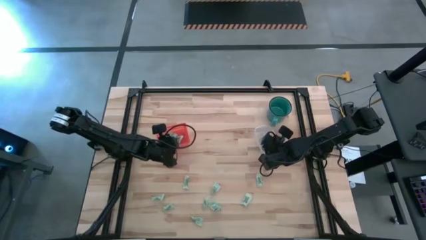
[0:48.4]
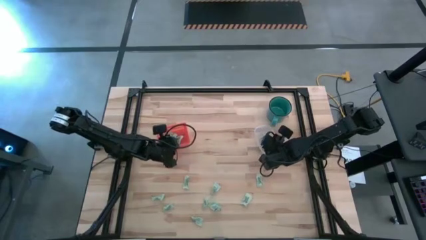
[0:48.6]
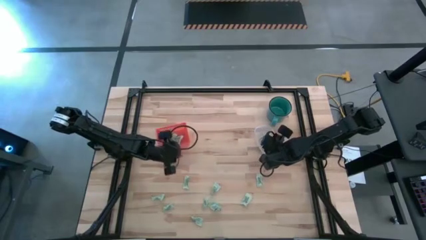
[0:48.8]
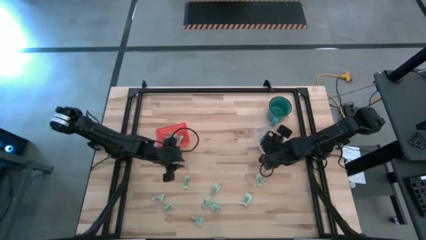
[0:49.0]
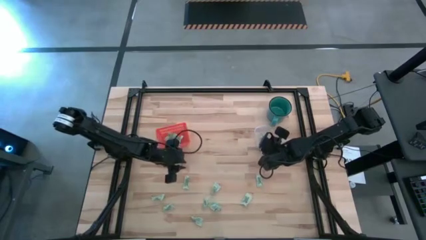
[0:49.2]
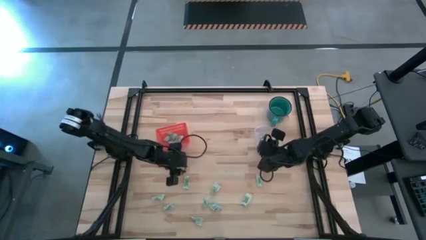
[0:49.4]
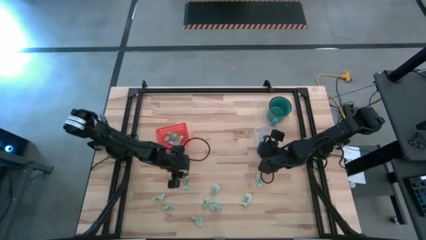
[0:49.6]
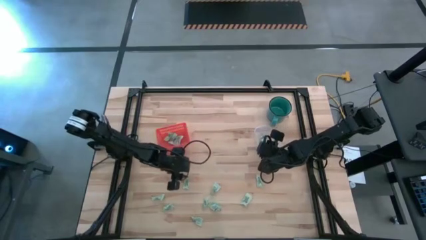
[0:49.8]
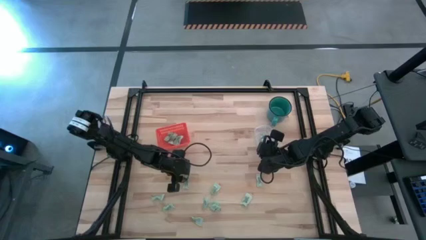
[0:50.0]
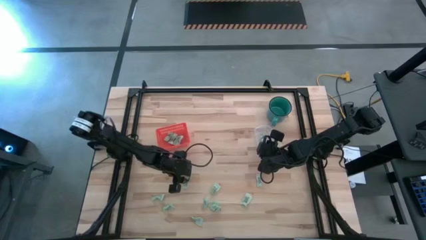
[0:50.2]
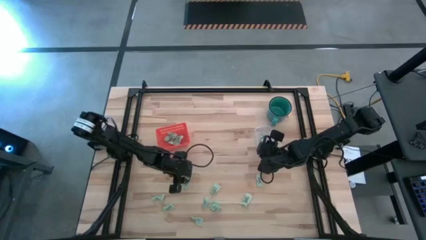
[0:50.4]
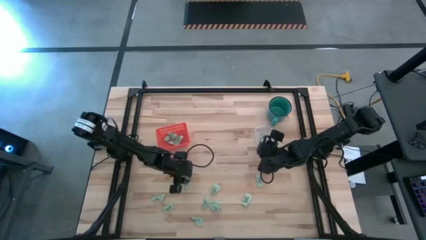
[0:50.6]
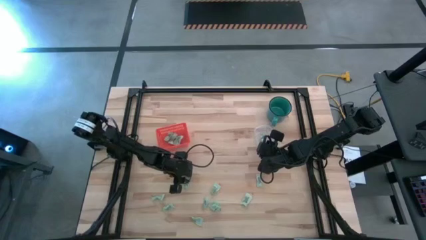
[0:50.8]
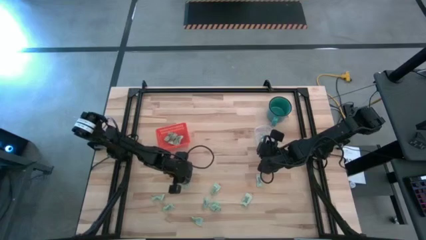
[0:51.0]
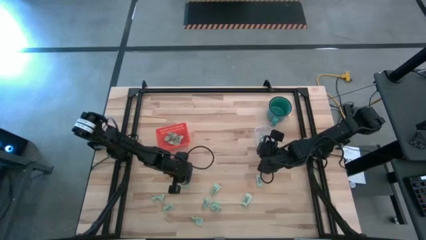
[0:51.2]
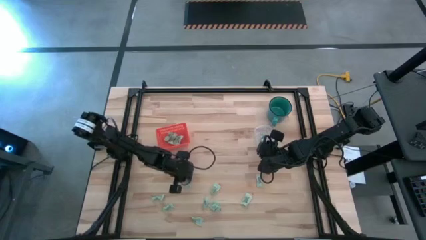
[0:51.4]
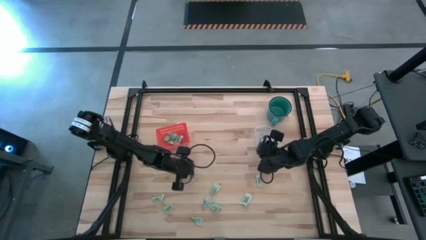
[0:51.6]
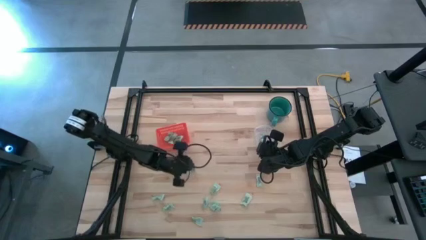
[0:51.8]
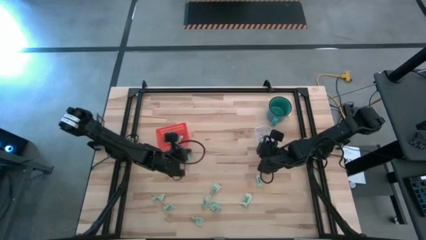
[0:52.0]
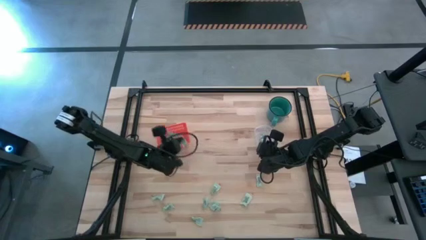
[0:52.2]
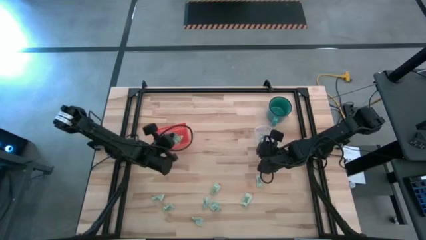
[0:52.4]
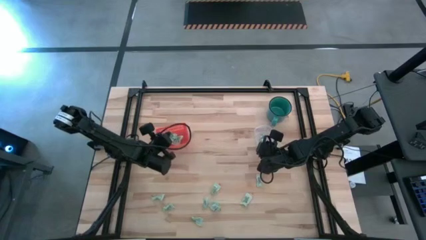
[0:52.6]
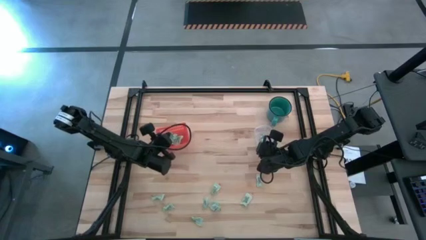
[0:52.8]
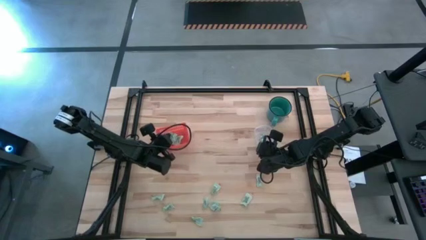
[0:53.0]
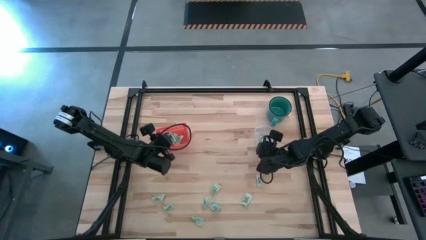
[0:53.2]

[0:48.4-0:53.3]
Task: Pick and place items into bin
Put the stevia packet into the orange bin

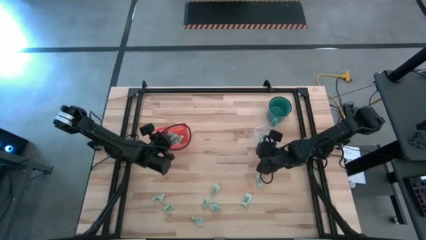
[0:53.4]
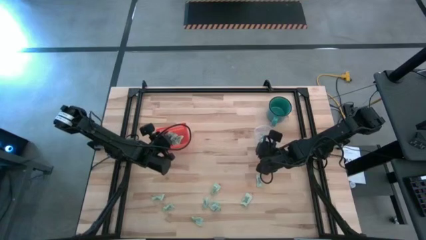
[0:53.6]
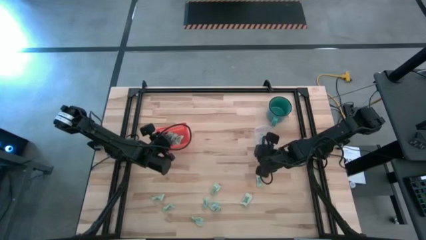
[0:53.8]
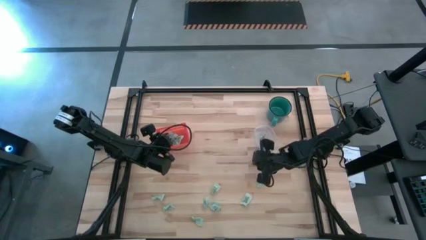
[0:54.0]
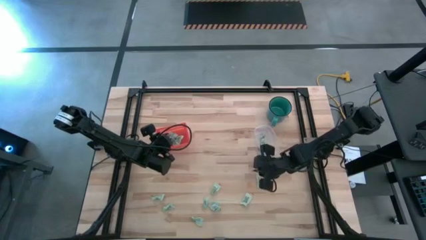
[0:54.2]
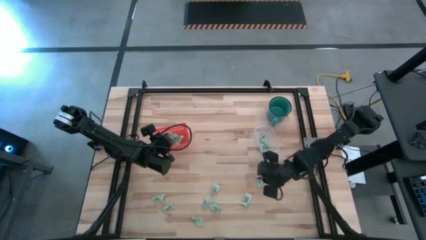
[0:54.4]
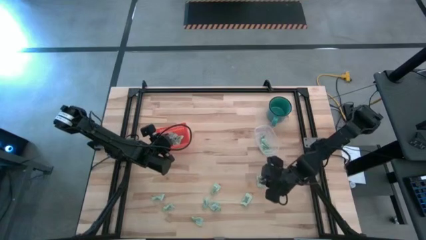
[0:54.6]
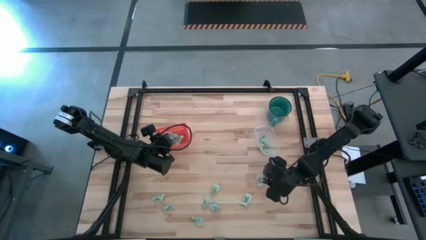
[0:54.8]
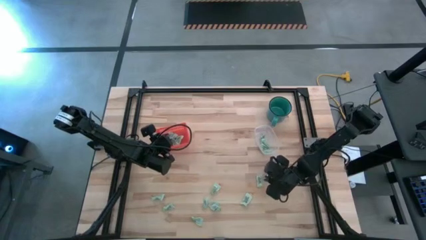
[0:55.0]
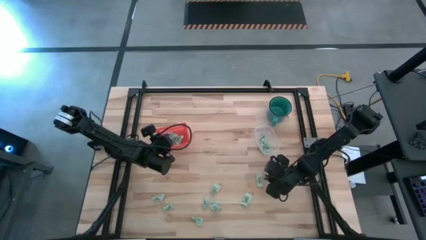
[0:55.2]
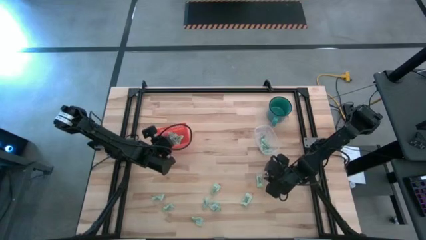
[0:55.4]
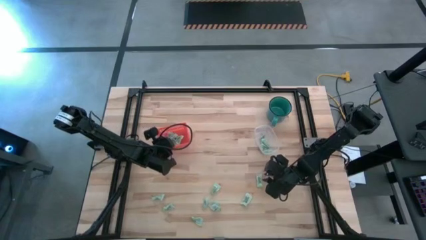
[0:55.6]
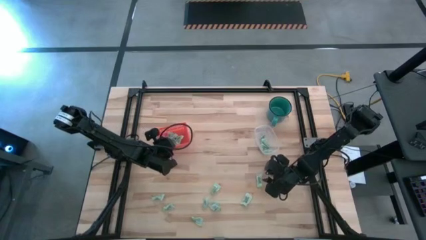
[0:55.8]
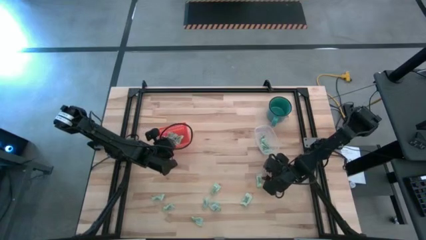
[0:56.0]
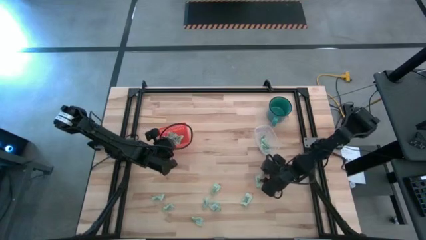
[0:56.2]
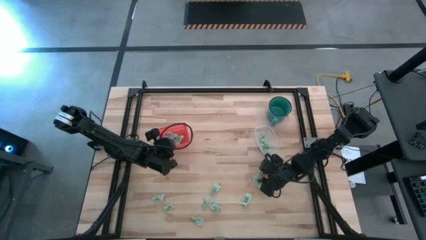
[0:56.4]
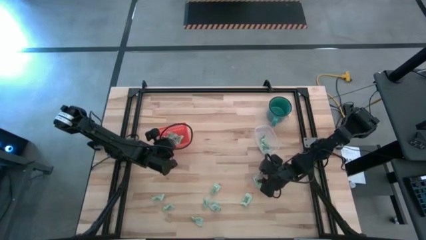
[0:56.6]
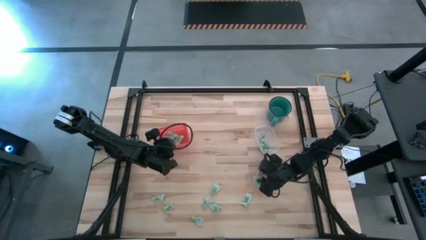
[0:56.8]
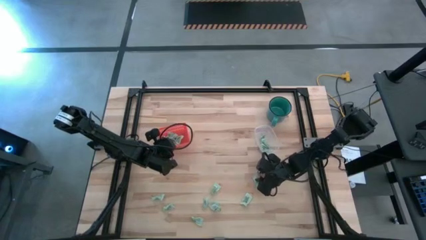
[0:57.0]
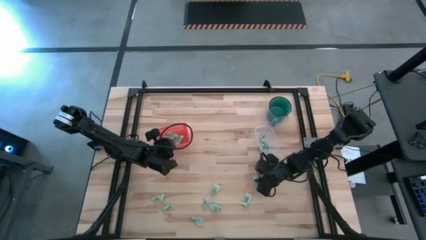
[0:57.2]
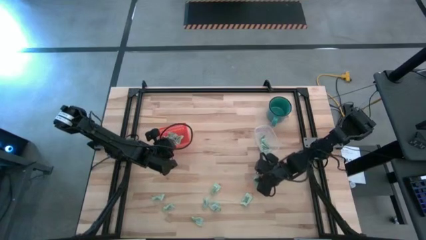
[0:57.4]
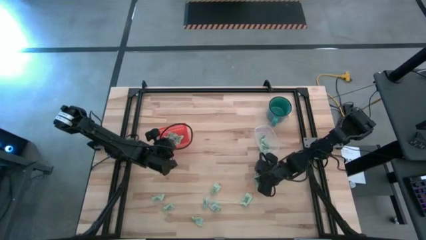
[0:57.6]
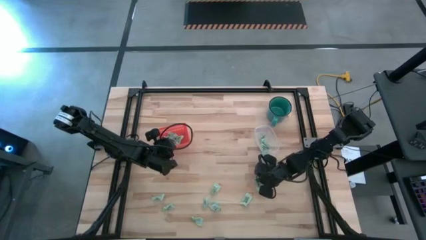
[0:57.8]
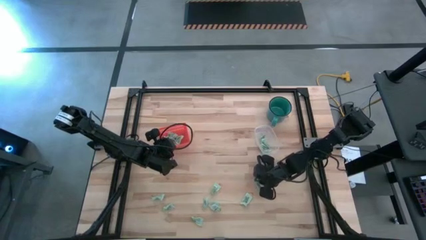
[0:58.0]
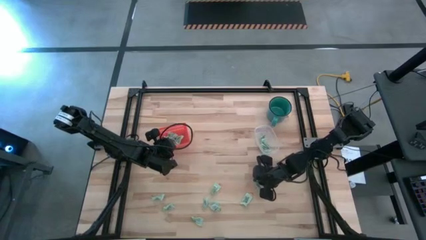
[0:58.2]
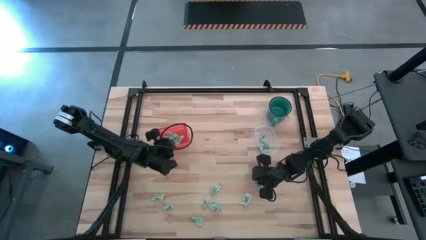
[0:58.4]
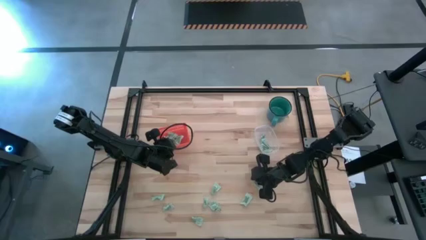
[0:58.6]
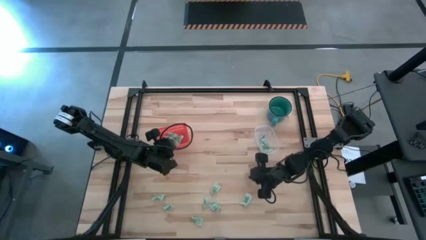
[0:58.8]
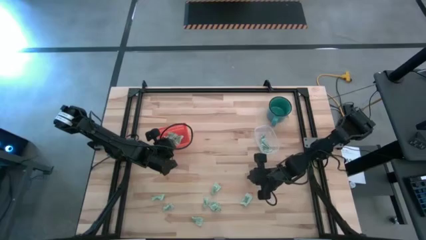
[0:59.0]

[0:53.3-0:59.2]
Put the stevia packet into the transparent container

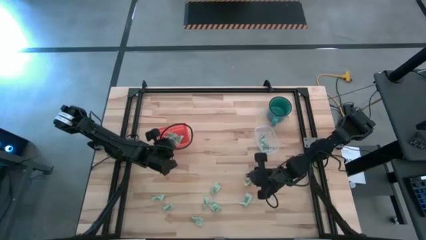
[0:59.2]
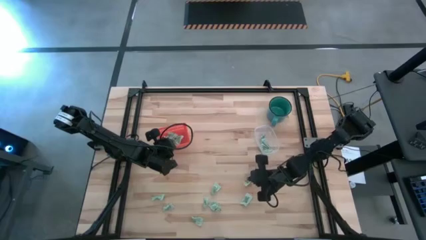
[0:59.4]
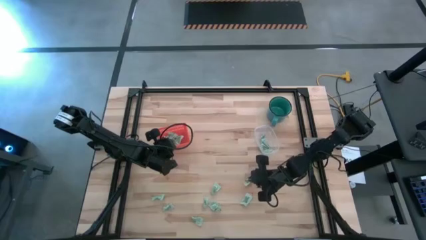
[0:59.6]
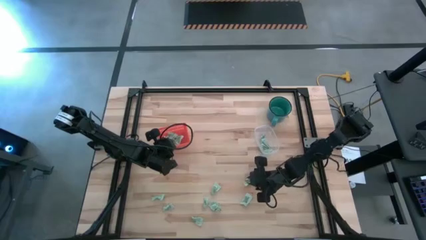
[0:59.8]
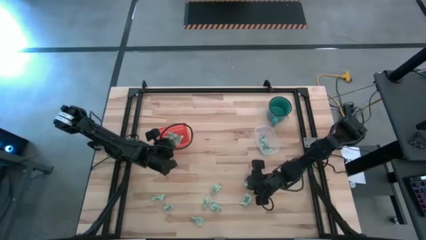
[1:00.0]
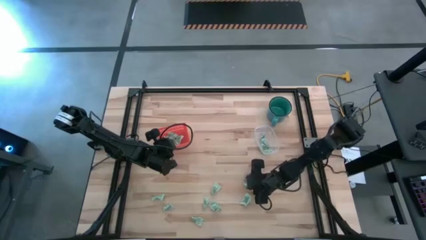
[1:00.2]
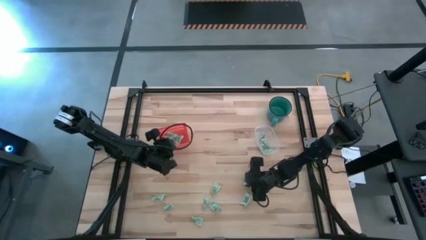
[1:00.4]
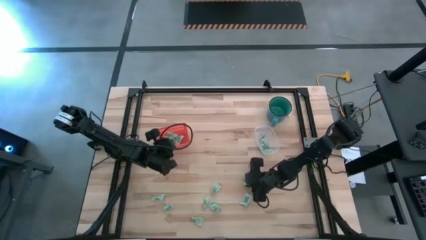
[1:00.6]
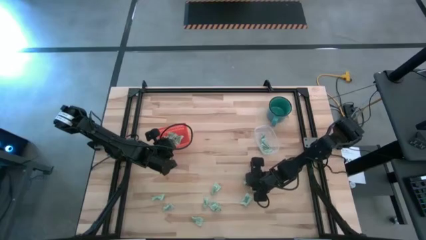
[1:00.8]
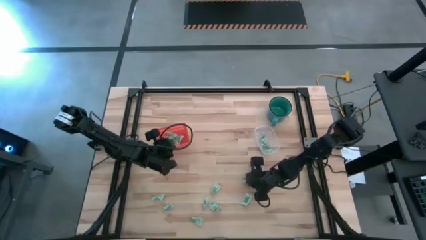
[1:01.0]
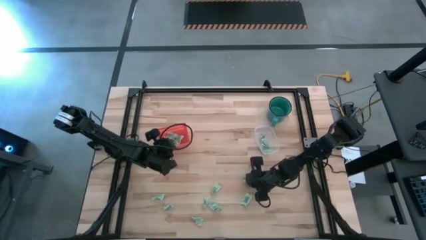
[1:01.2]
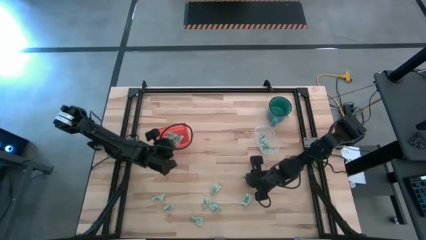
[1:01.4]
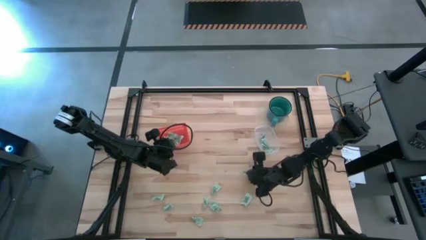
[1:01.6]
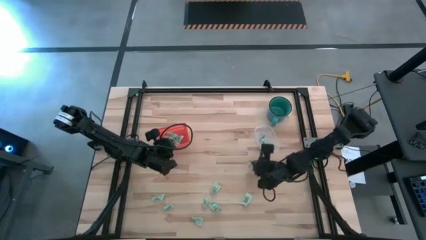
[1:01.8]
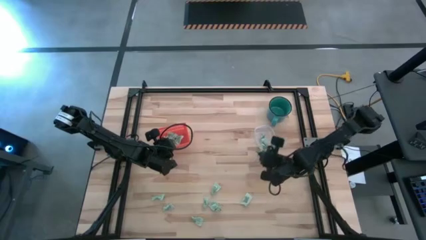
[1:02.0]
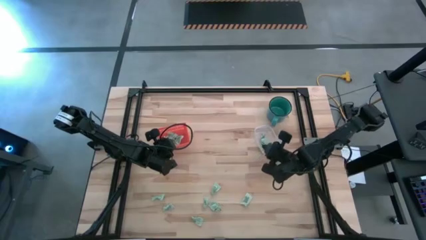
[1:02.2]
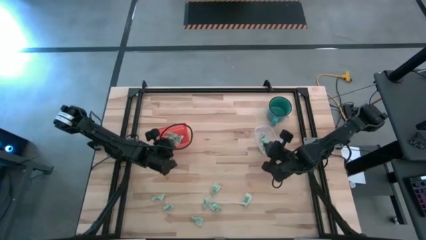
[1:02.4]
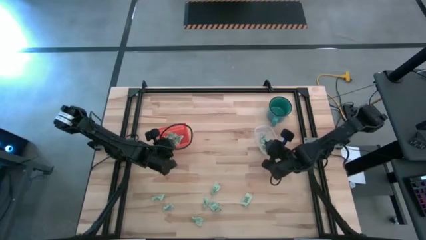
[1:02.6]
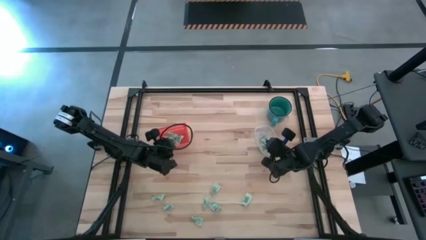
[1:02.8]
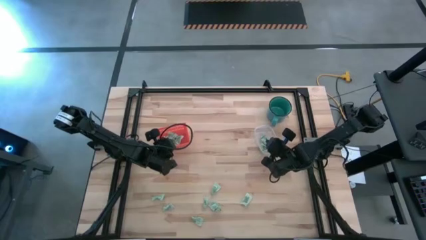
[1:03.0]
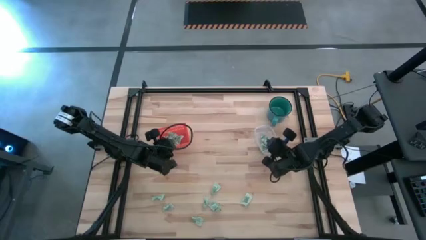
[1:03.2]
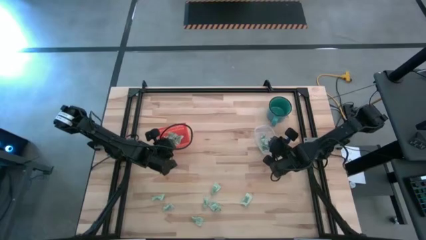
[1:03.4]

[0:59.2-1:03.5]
Put the stevia packet into the transparent container

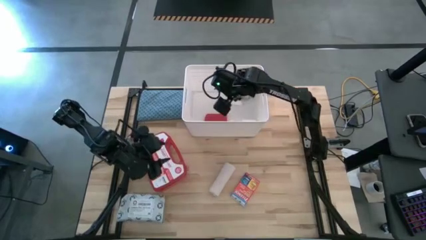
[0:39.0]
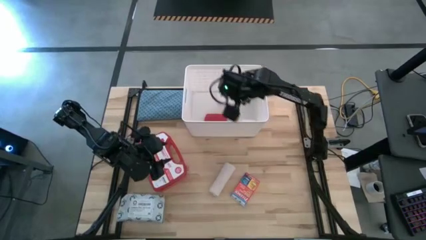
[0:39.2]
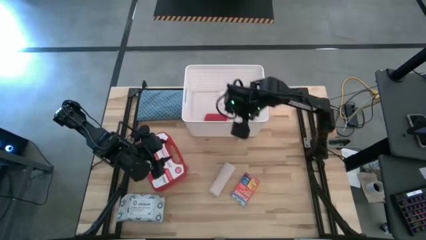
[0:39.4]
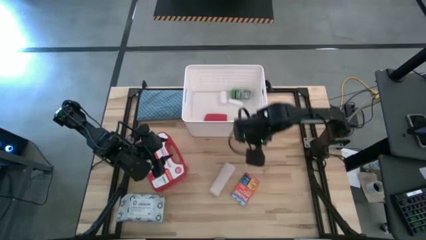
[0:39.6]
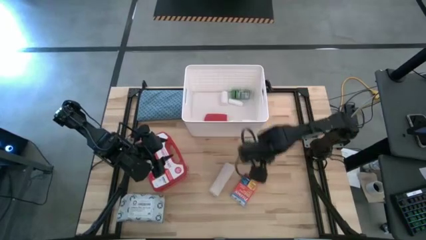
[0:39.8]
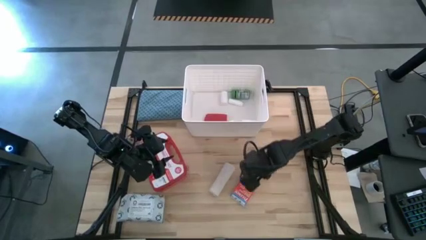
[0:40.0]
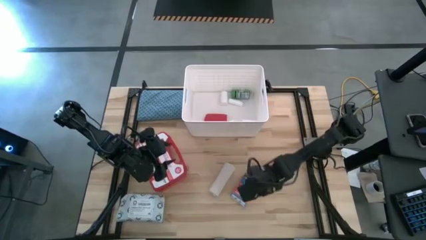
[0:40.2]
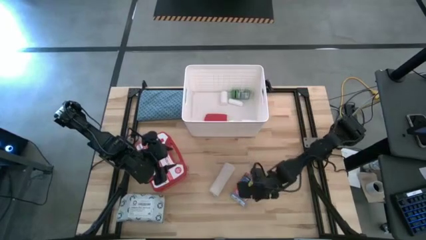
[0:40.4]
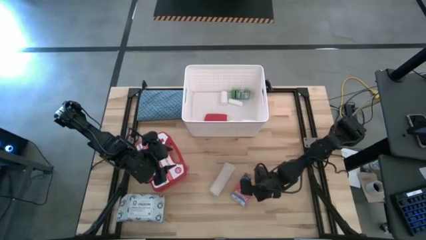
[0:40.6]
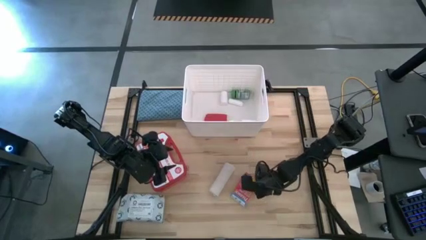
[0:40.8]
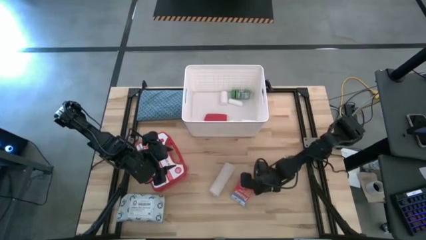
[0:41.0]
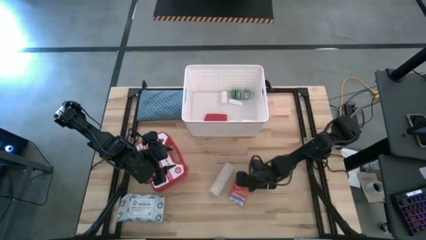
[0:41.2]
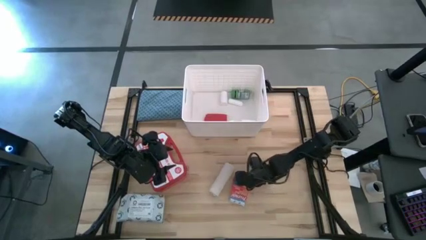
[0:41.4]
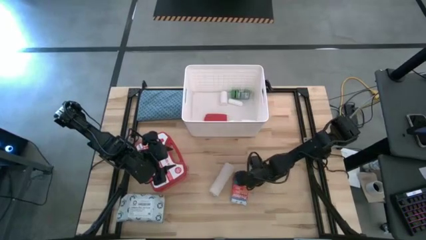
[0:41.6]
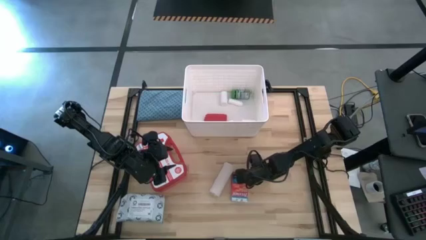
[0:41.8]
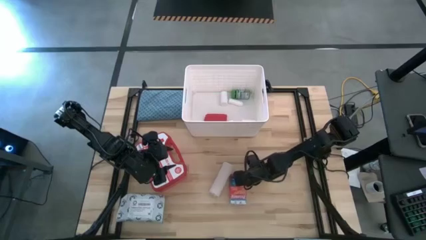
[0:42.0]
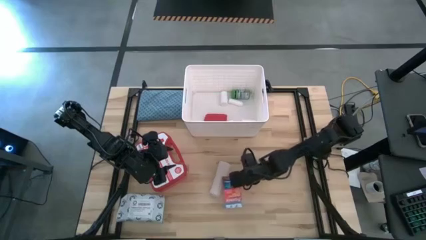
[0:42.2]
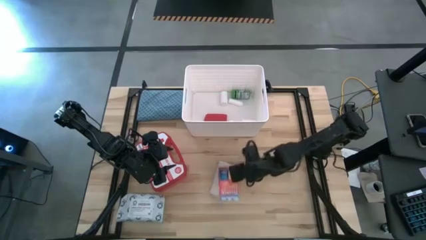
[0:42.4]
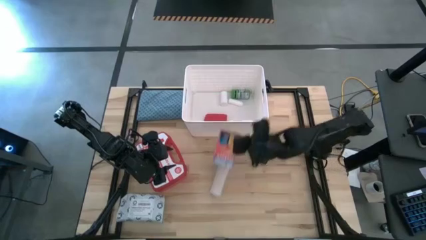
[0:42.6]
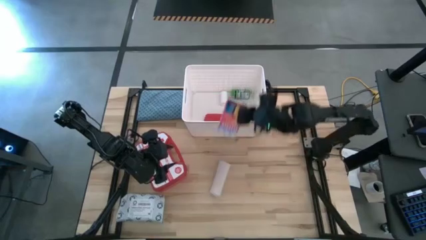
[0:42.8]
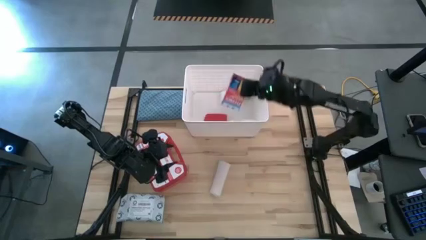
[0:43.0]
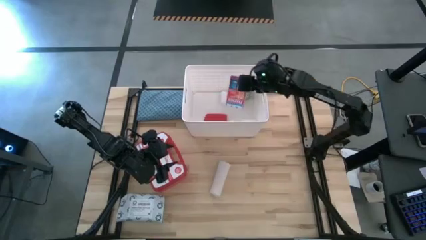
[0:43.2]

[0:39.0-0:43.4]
Task: Pick & place medical supplies in basket/bin
Put the red medicine box in the white bin
